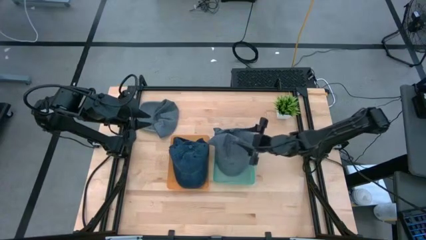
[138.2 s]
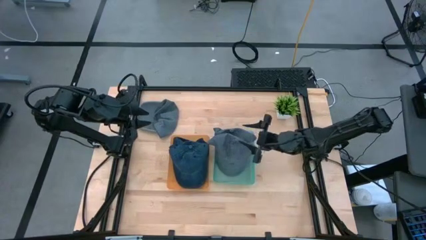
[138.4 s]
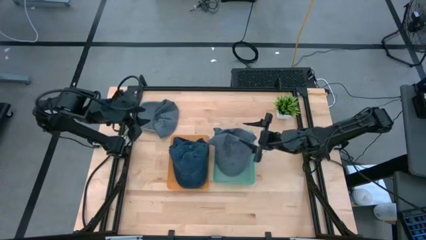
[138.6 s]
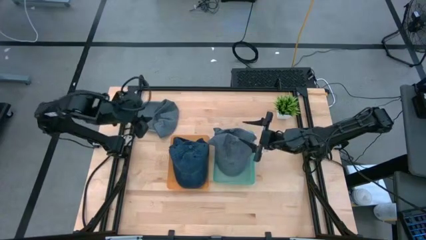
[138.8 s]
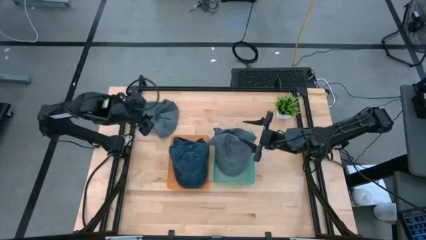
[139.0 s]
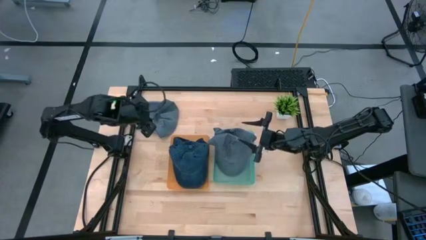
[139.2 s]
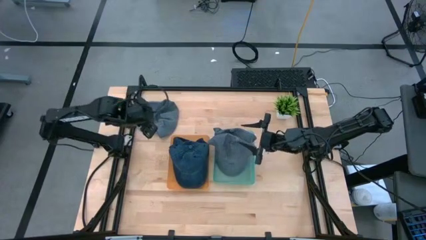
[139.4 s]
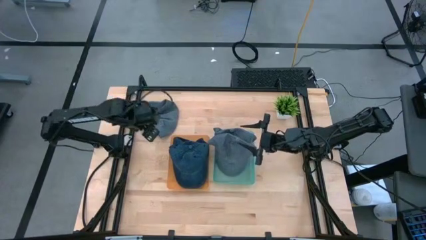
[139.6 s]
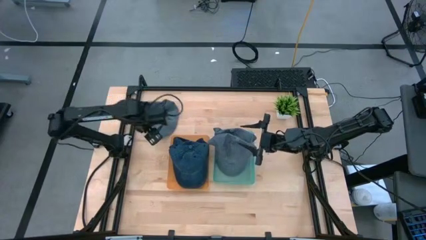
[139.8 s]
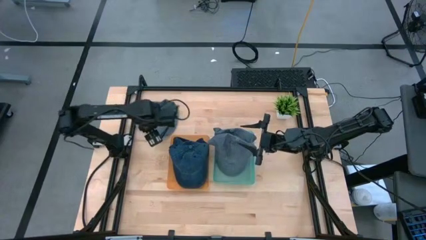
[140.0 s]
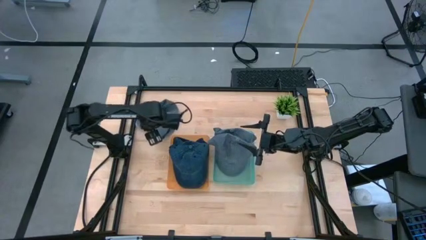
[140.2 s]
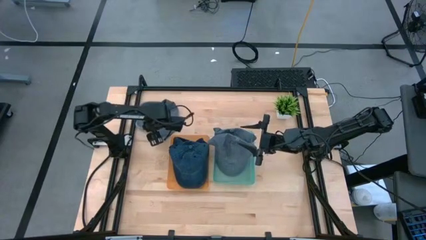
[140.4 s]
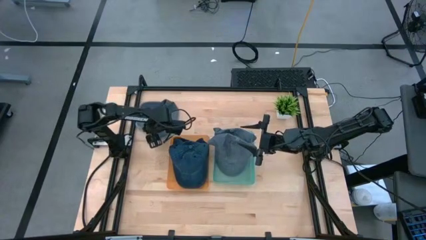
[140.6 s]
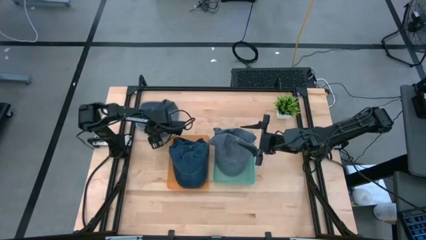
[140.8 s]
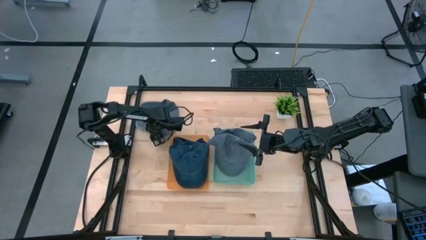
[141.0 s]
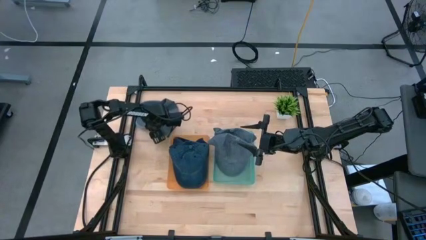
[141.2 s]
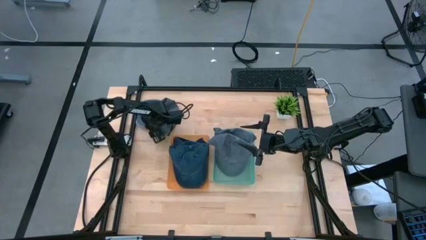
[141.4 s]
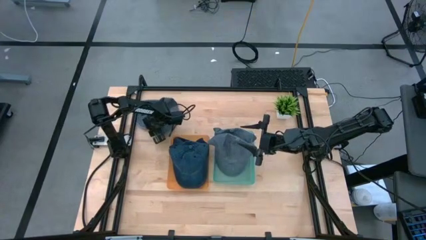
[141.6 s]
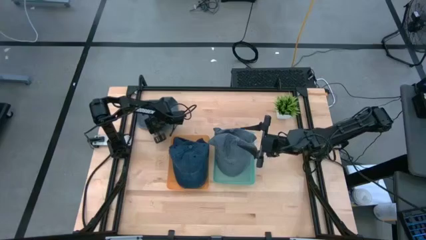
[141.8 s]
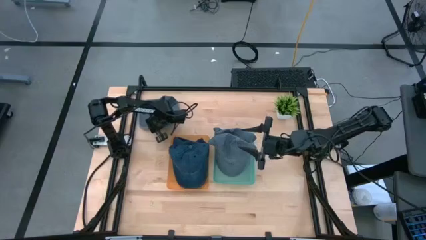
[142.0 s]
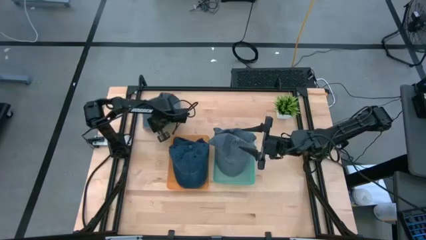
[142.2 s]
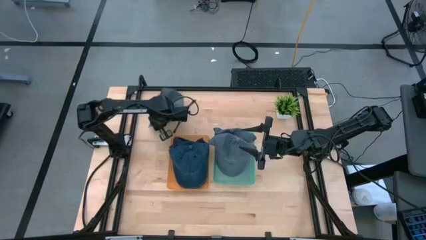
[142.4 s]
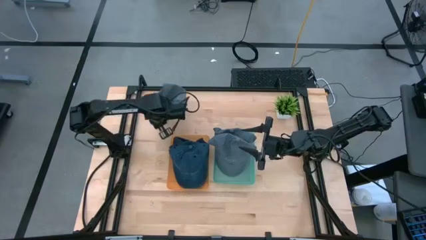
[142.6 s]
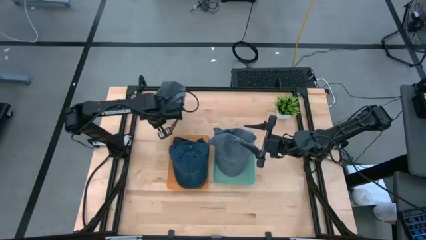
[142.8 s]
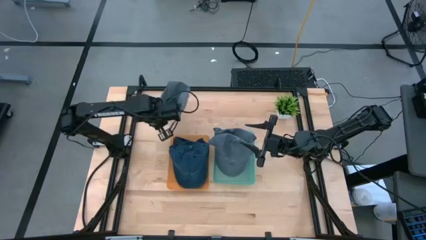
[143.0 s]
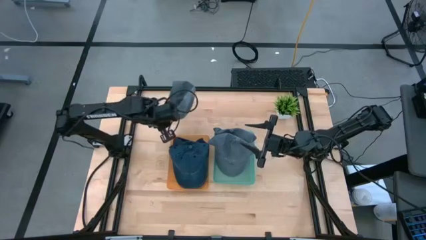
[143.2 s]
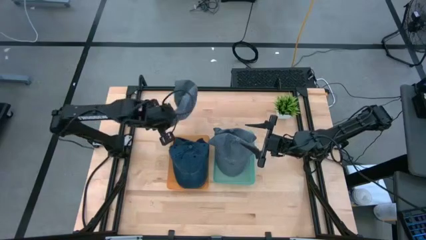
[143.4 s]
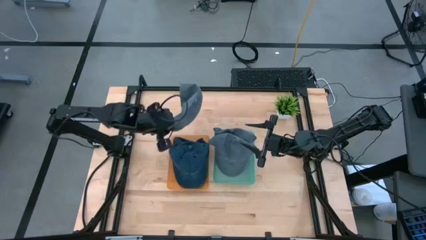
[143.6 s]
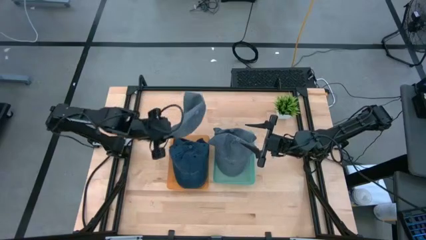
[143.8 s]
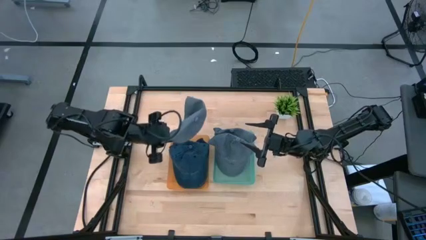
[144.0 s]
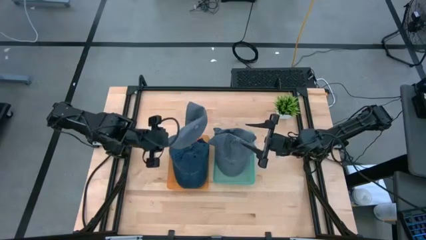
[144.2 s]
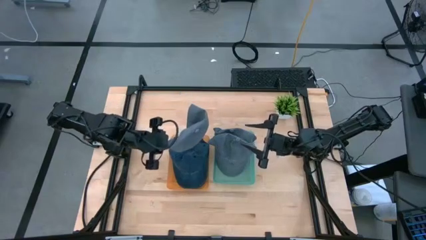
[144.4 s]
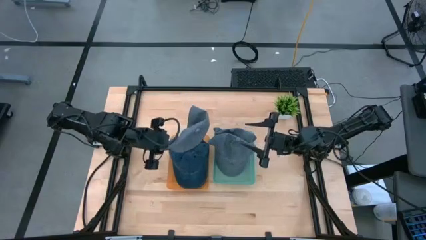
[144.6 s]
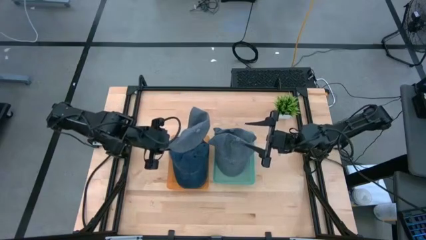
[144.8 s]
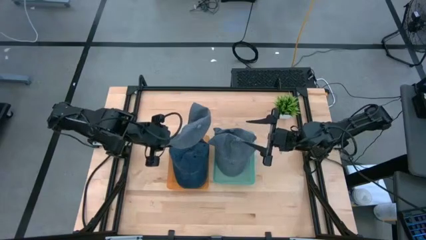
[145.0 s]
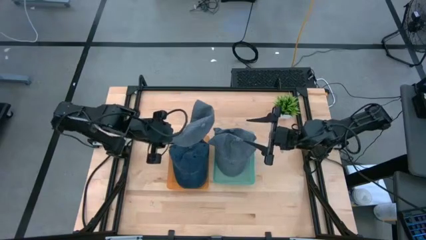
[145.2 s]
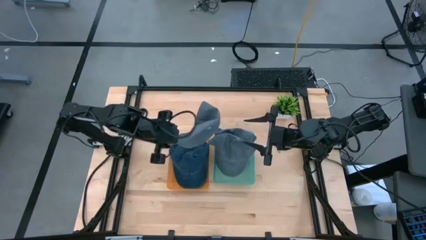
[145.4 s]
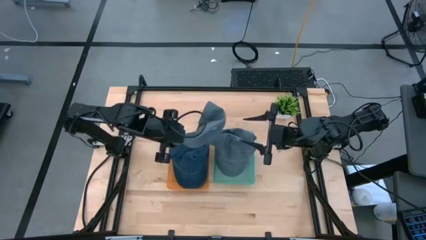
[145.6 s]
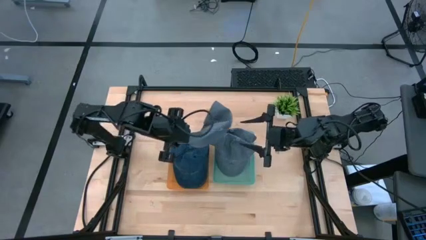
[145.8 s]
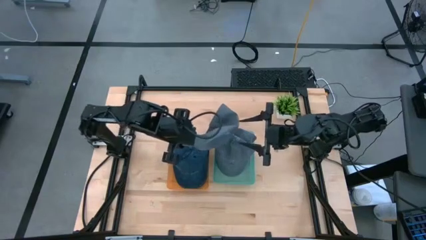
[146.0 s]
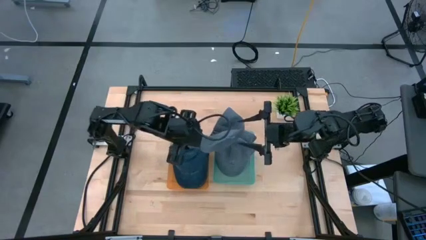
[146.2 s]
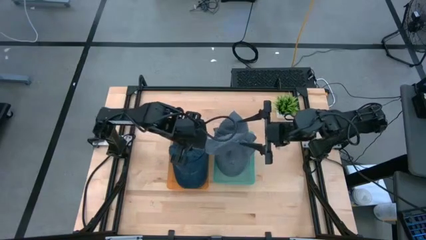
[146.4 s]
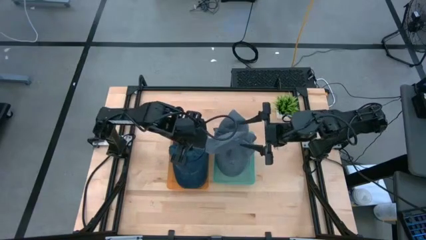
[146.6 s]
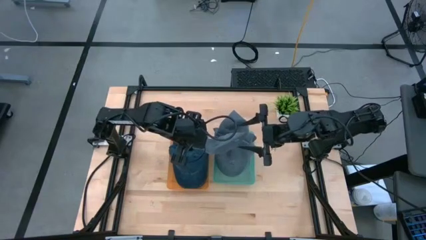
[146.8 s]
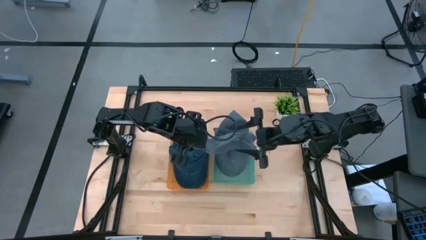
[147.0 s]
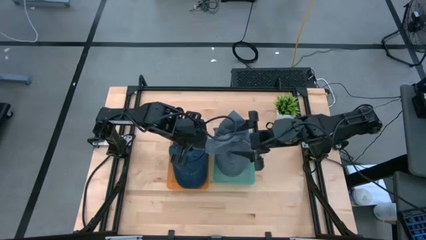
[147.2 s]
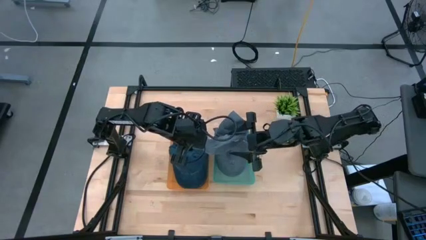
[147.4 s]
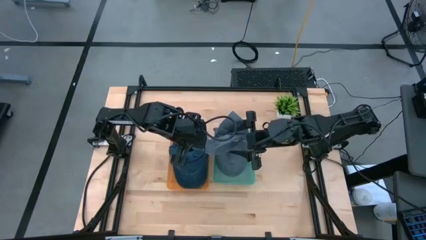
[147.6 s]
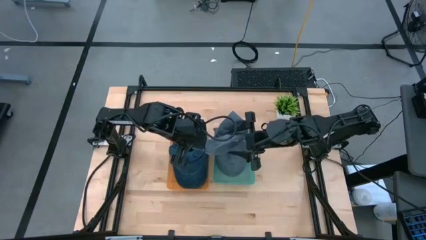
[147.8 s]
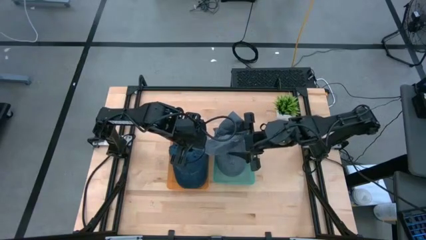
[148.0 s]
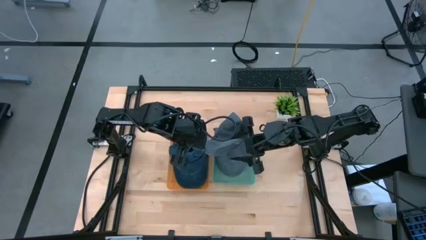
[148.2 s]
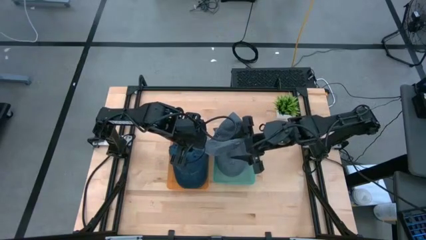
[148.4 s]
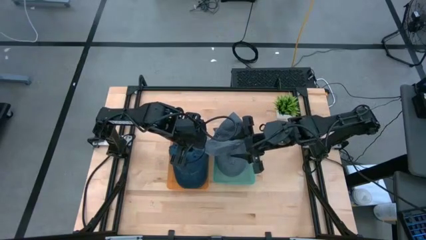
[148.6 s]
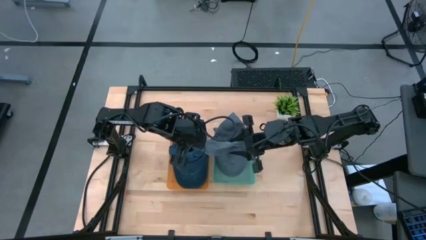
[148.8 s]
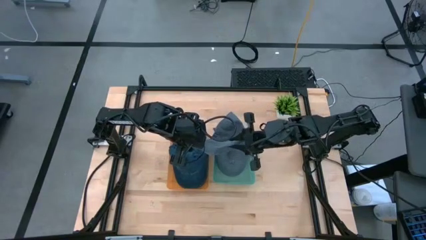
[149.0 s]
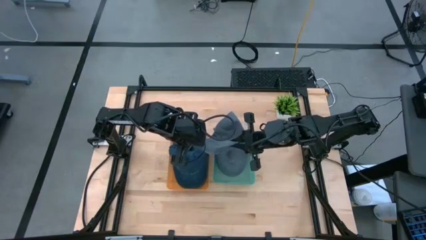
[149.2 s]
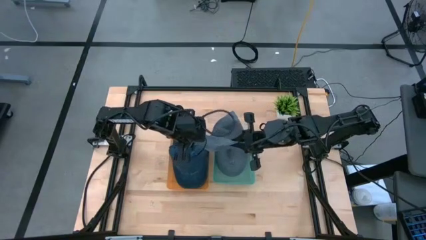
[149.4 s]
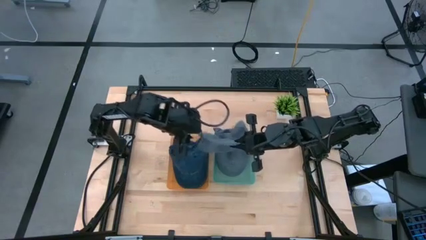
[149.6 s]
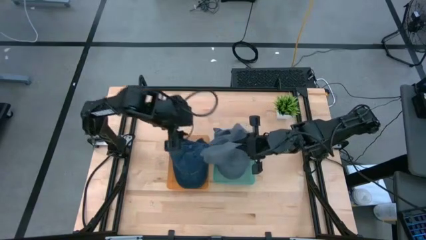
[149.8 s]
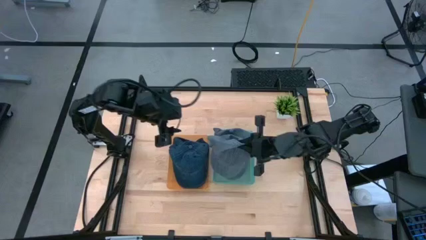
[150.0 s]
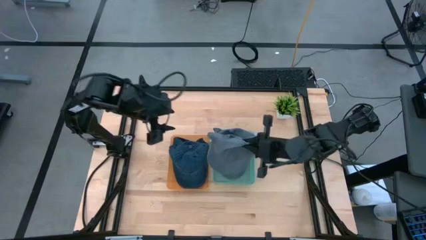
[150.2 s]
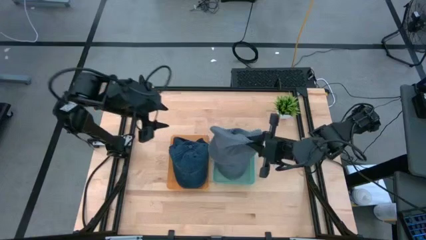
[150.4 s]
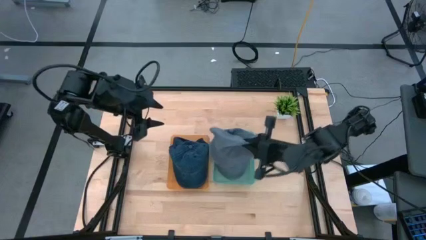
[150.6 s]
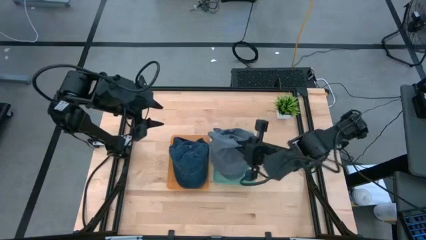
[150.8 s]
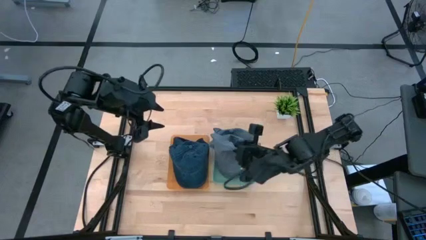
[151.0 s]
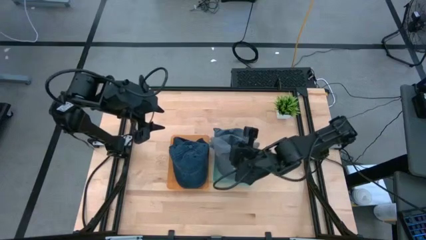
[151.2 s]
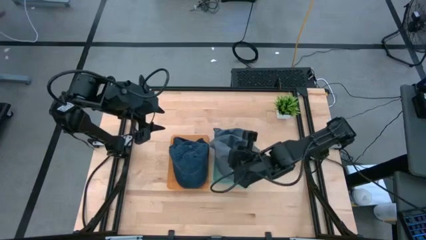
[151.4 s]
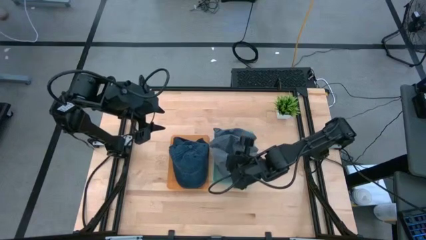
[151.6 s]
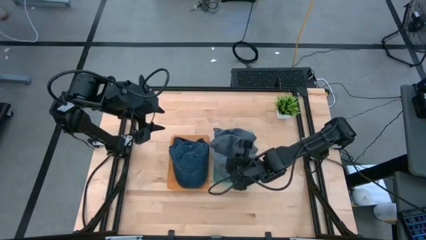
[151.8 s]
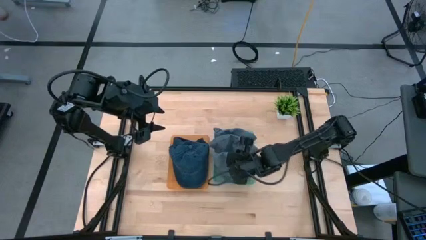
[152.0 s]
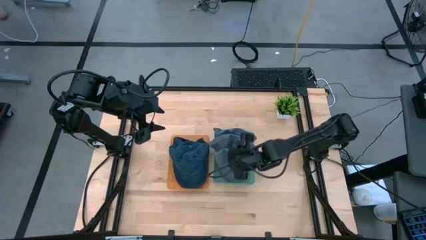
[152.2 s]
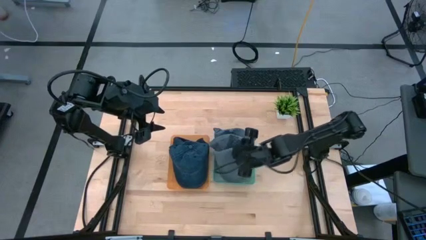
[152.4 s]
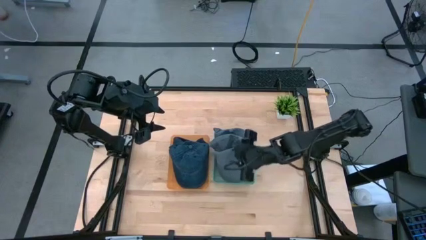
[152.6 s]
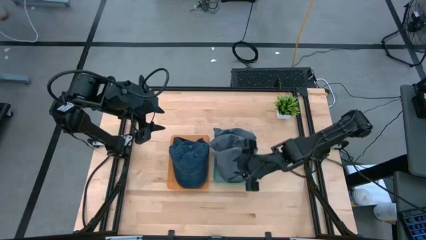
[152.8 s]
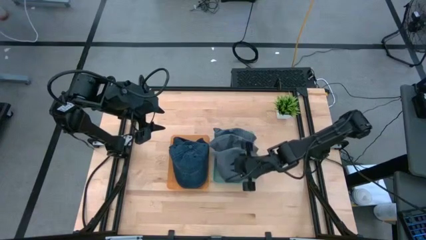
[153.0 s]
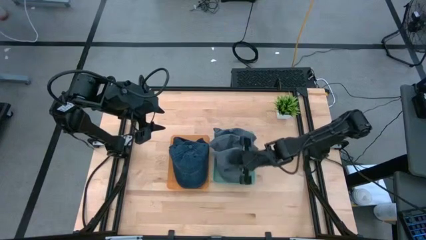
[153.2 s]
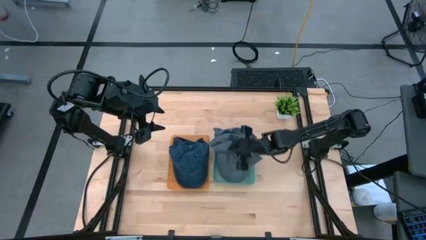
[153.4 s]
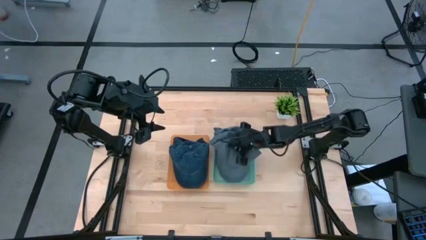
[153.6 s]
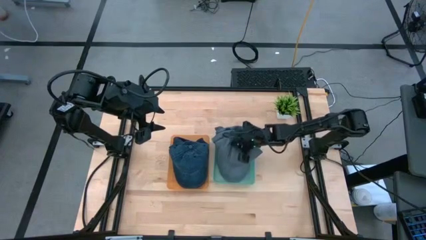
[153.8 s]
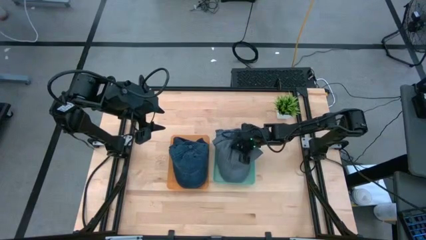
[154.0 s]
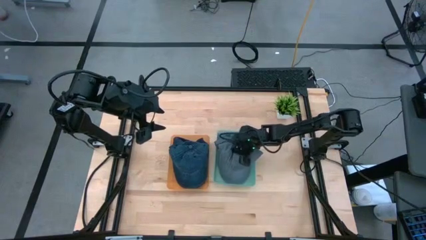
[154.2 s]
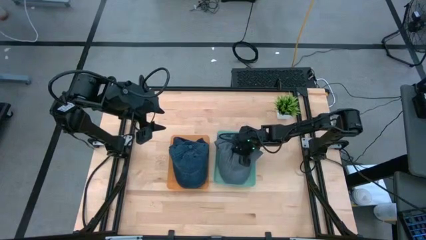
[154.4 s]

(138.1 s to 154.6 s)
Task: Pick & Place hat
Put the gray cap into the green bin
